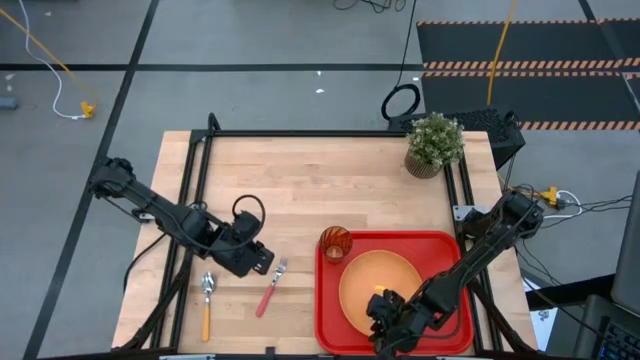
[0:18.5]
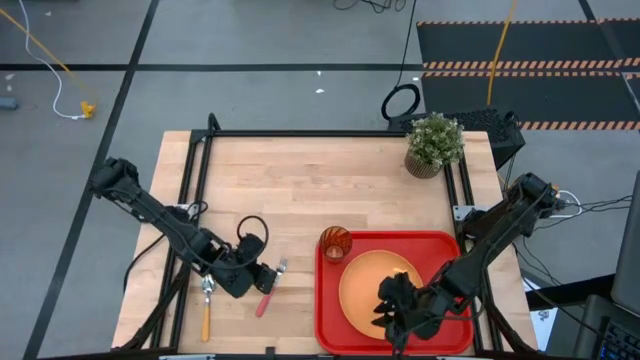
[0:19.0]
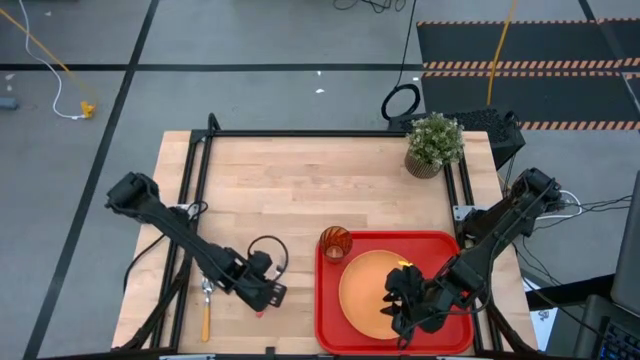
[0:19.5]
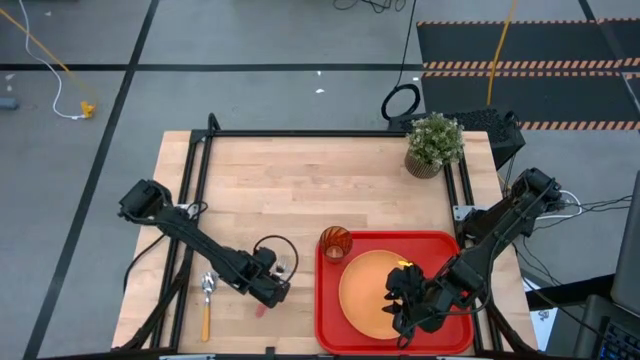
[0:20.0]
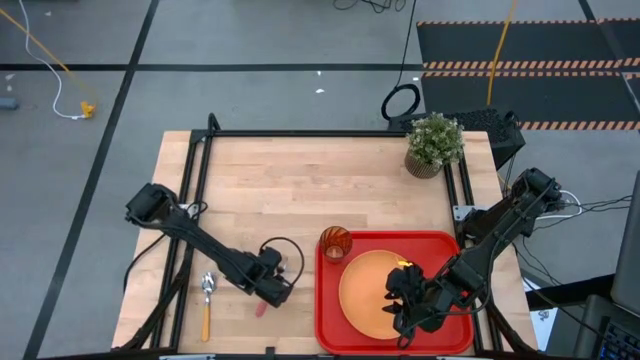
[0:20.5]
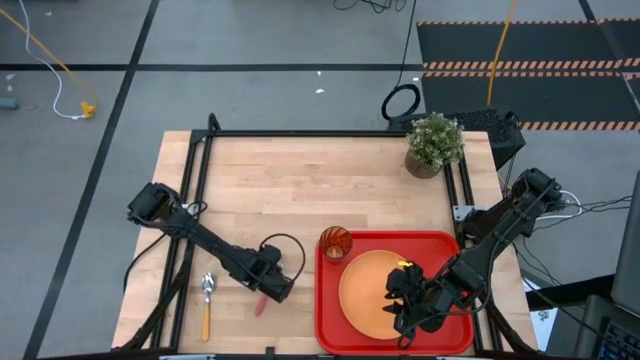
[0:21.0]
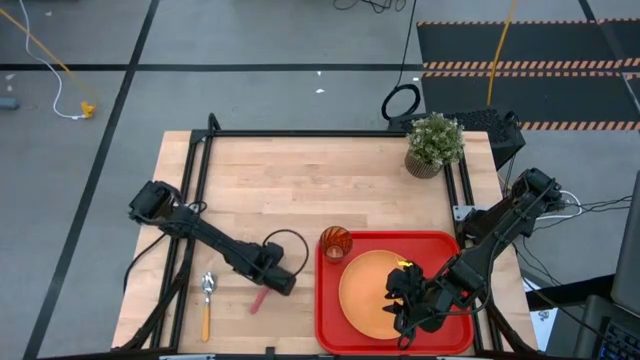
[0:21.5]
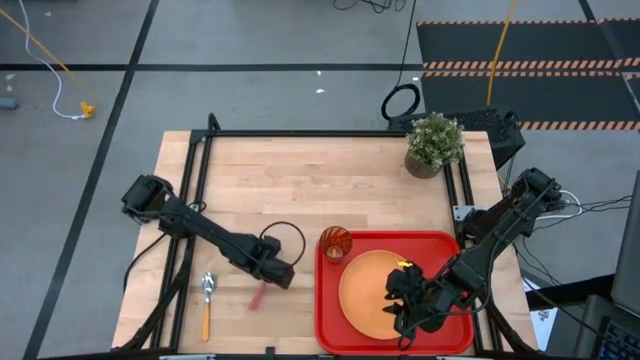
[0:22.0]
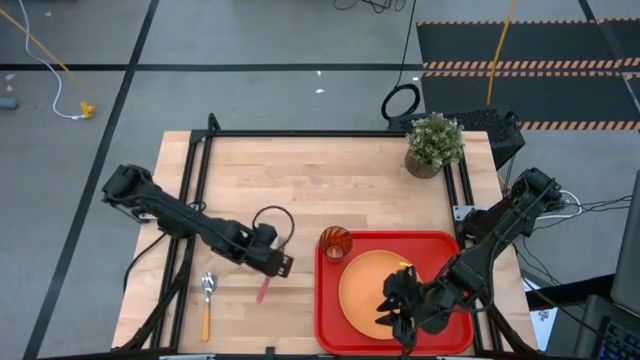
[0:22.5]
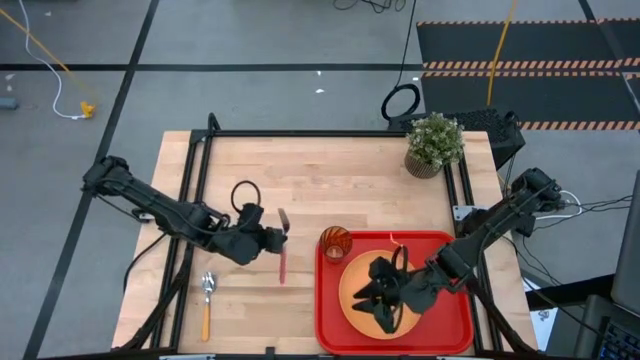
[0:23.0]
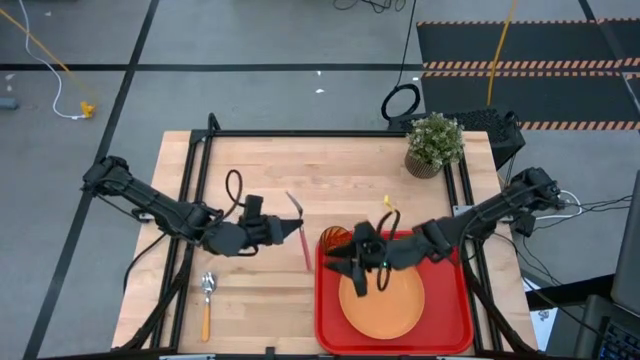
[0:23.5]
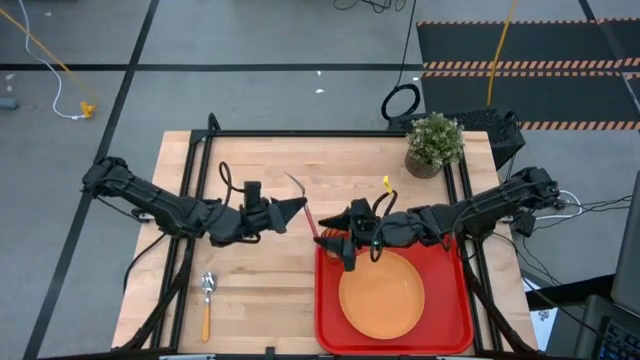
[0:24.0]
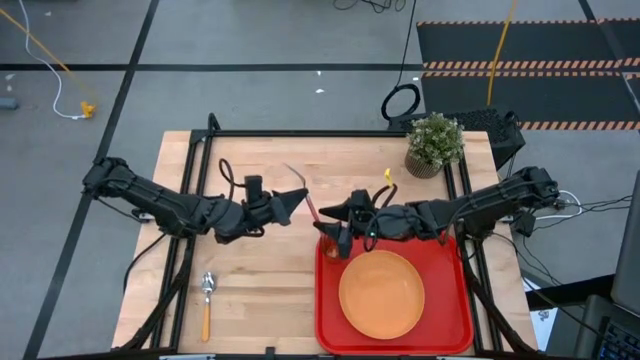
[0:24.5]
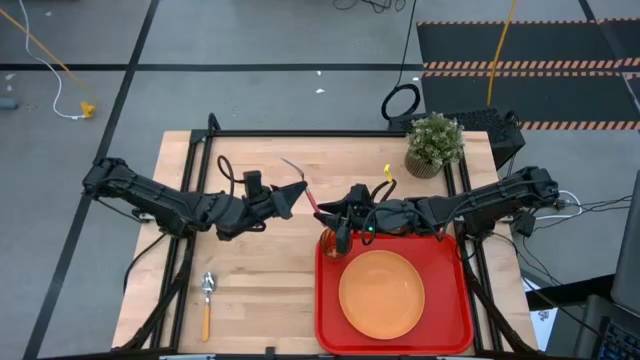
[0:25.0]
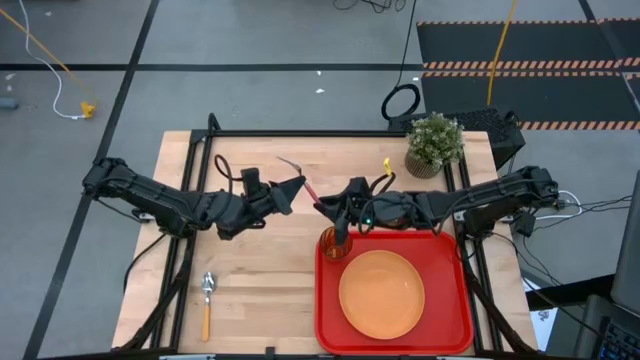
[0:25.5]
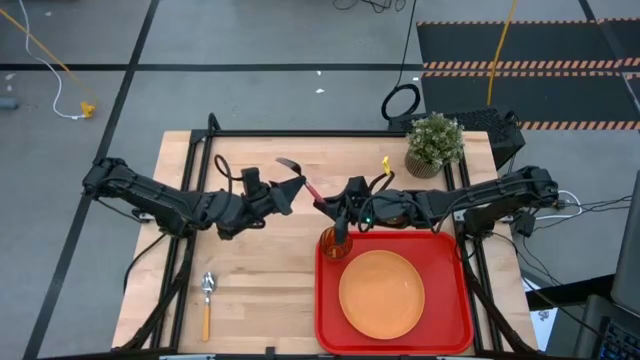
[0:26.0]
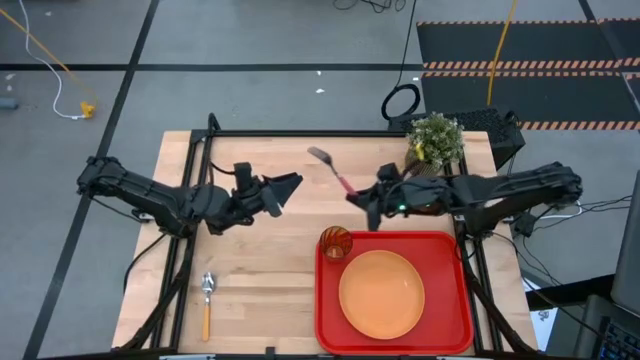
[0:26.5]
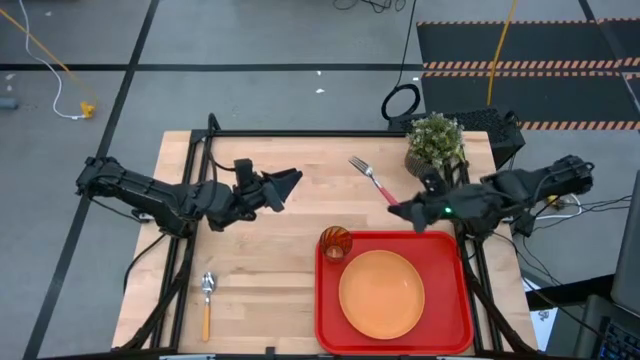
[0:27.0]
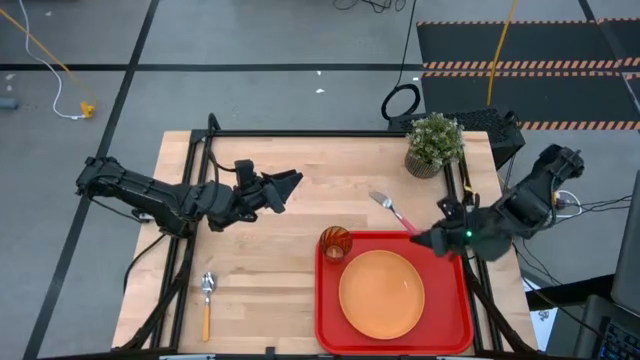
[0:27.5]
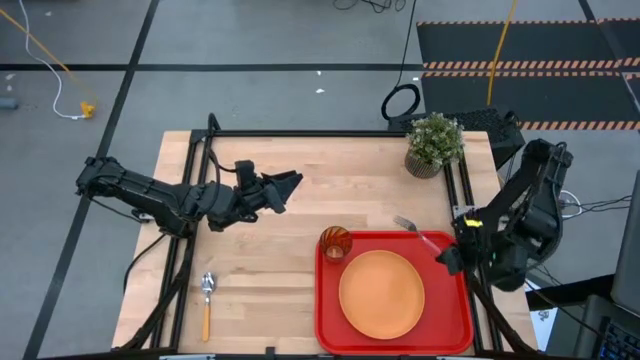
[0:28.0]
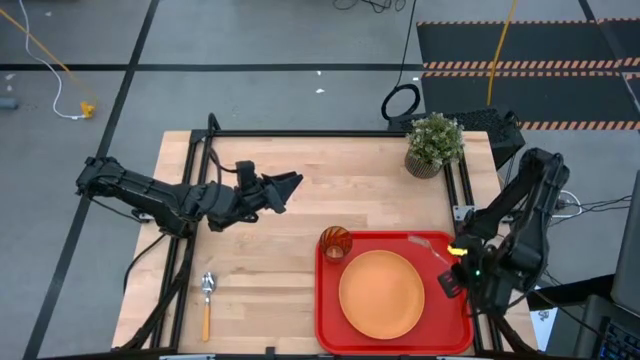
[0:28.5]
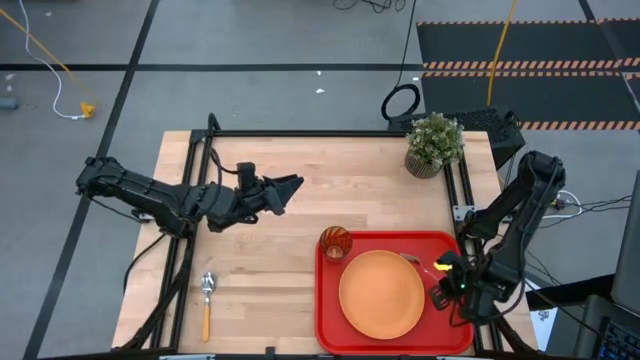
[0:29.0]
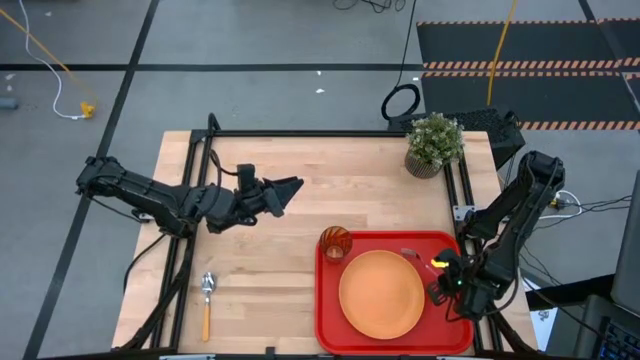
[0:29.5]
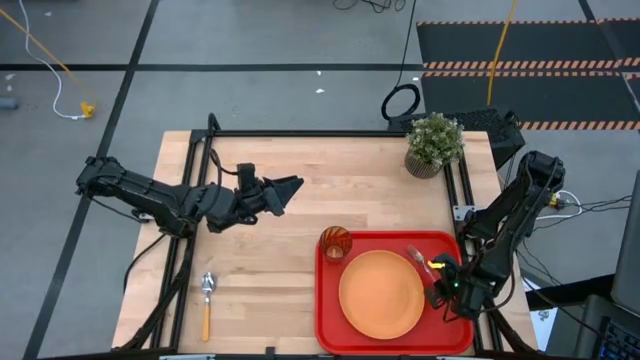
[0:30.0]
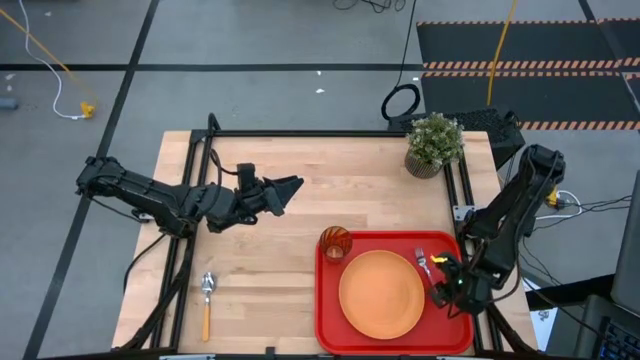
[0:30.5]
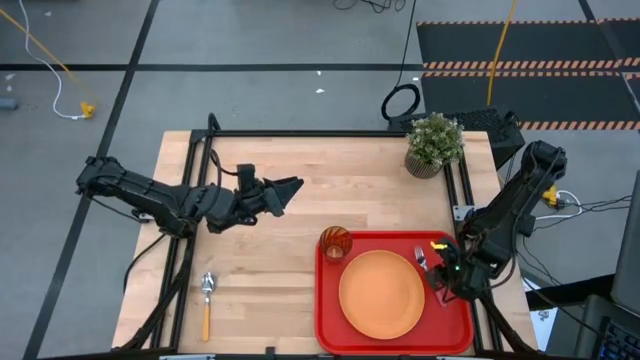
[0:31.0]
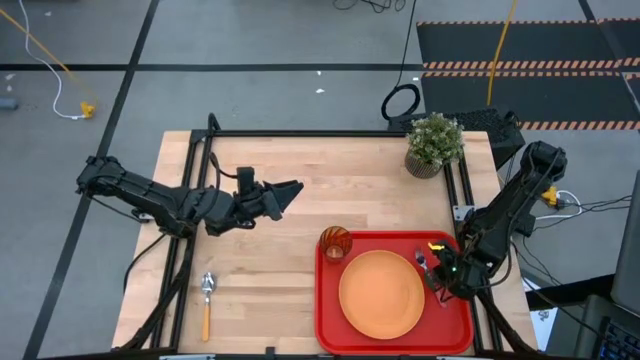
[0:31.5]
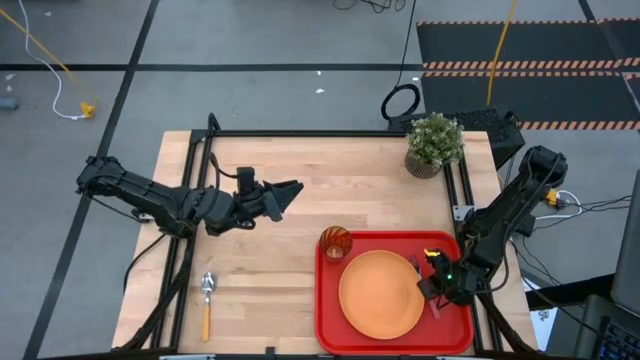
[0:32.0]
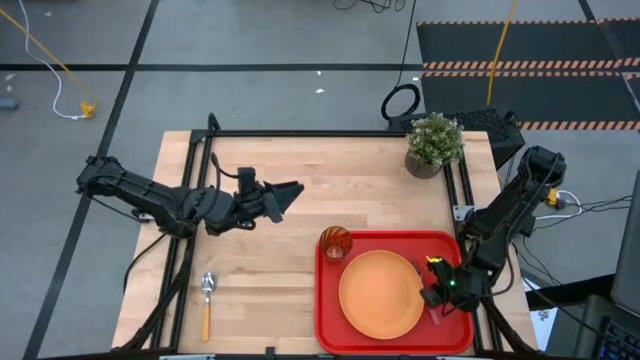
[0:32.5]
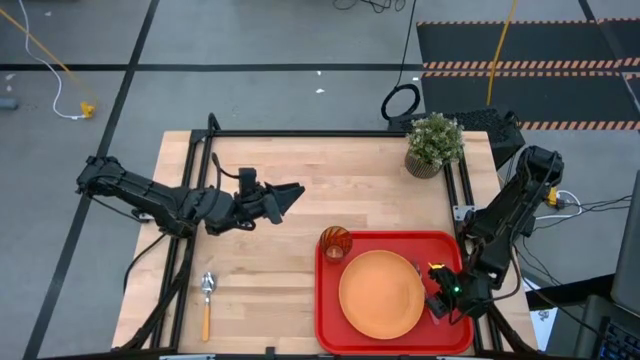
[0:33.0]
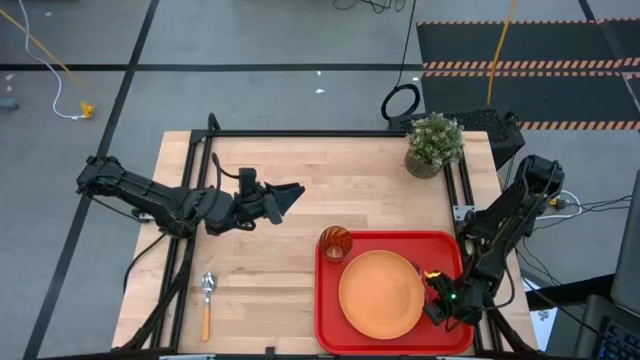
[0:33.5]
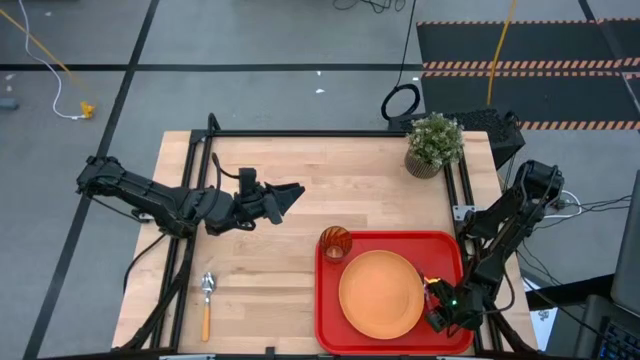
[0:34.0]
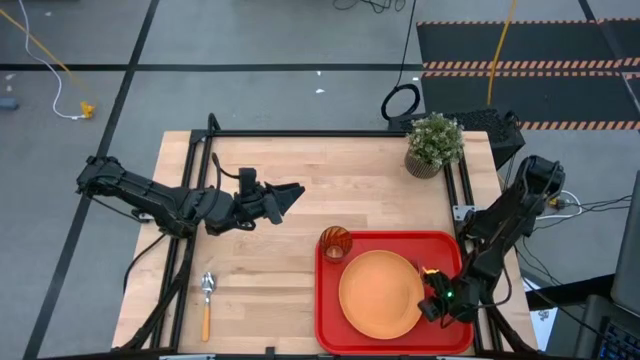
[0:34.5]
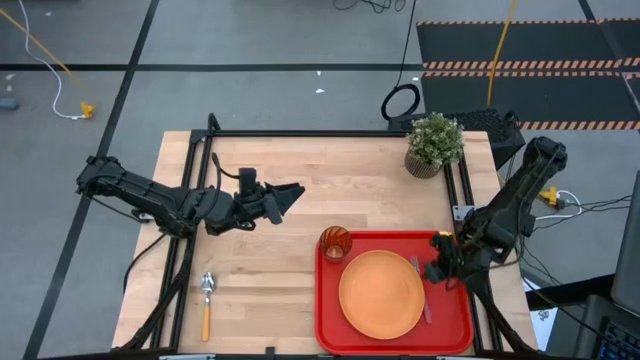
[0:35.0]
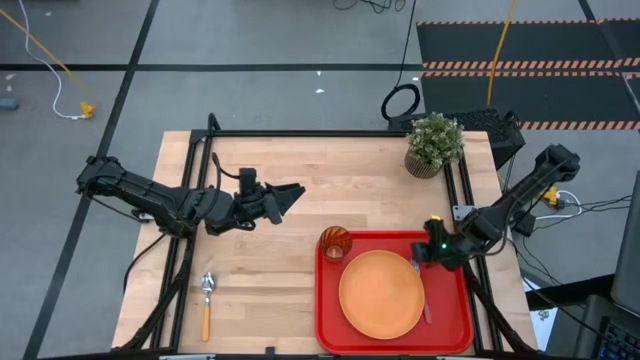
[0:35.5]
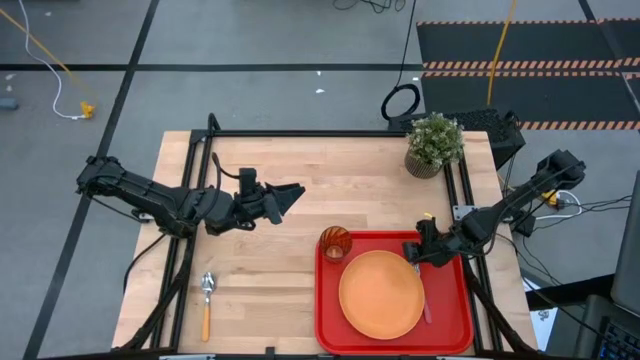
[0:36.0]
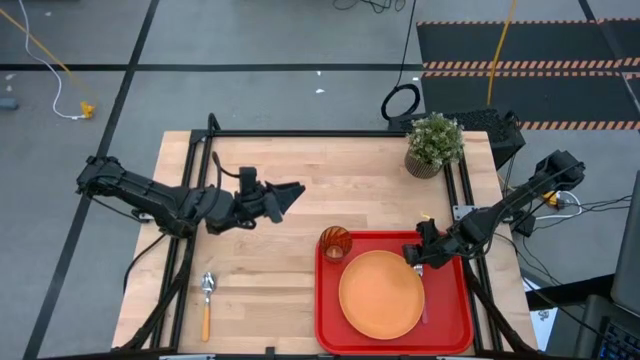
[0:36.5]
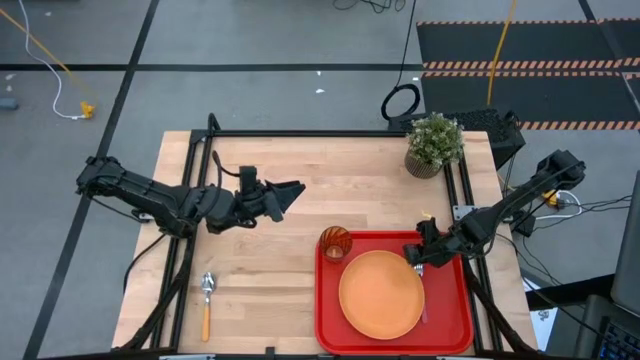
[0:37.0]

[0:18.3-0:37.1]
Task: Pick and place plate/cup/fork/spoon on tray
Put the red fork on the red serving tray to the right of the orange plate

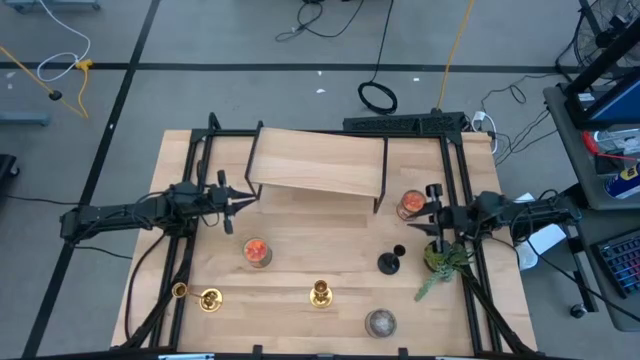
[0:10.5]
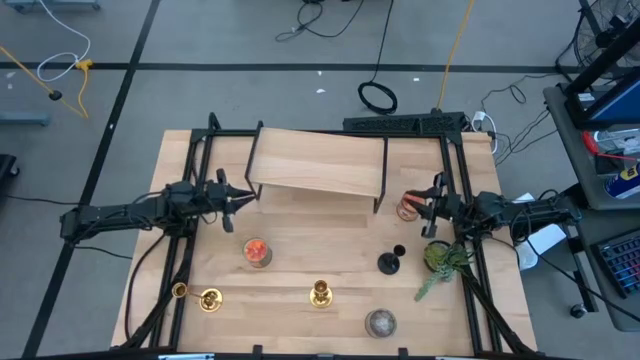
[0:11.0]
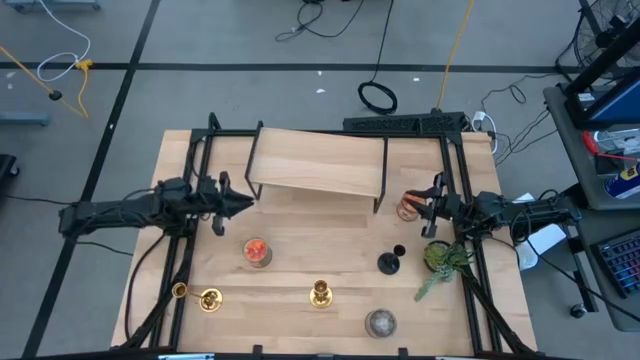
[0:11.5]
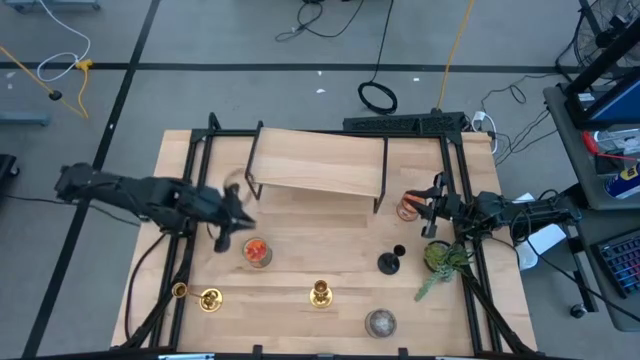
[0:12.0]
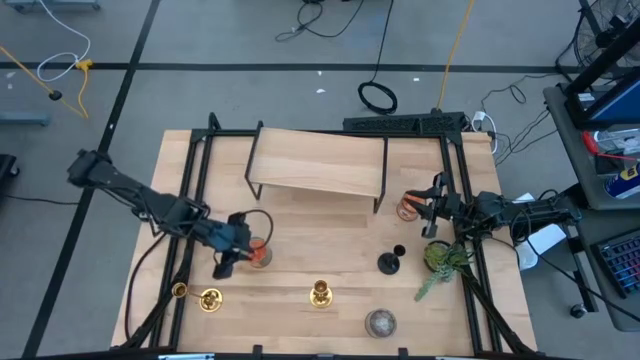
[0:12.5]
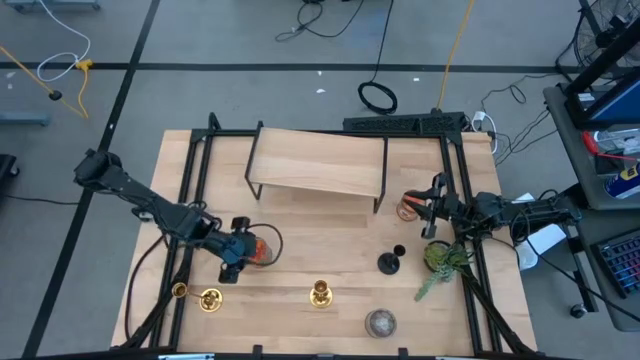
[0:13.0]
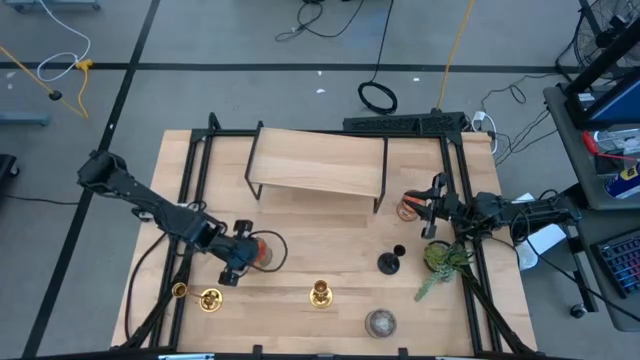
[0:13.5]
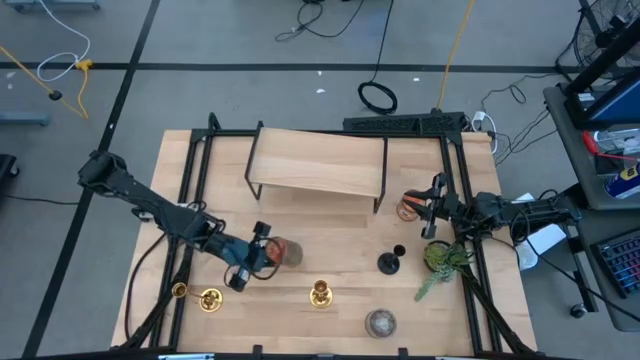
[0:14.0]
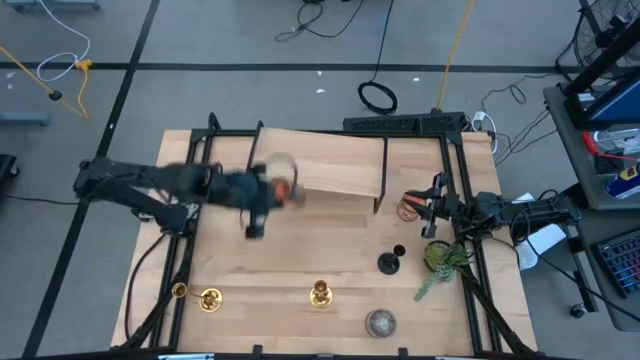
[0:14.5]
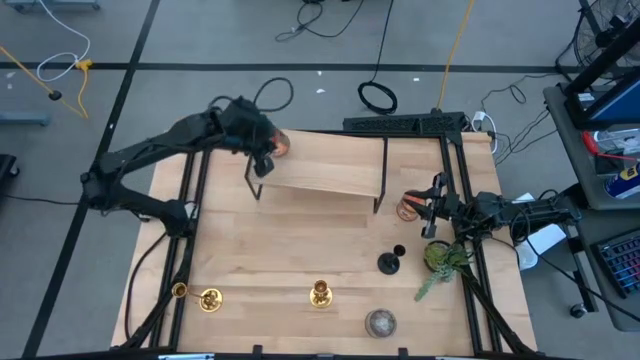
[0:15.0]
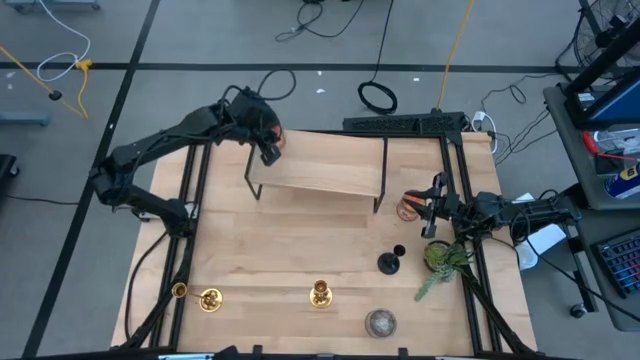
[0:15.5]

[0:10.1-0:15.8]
Task: Pick & Place candle stick holders
Put the left orange scented candle on the shelf
